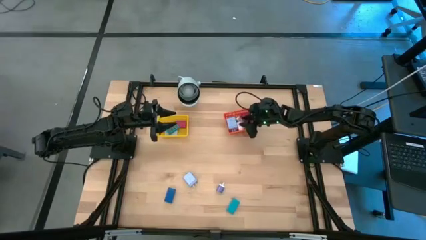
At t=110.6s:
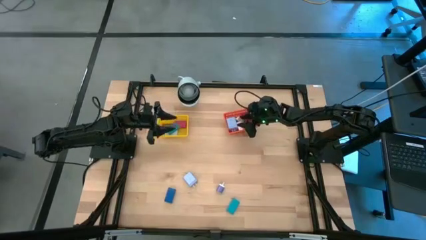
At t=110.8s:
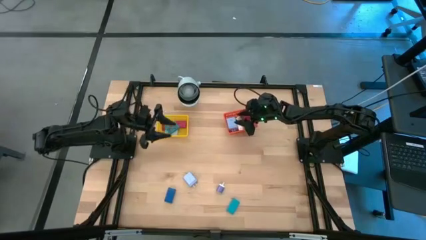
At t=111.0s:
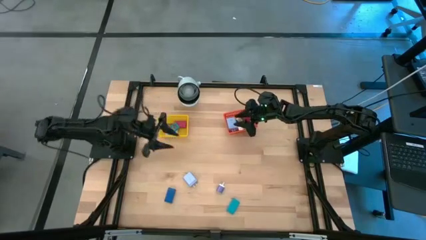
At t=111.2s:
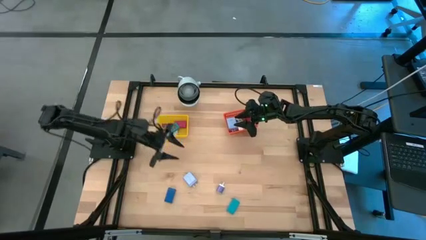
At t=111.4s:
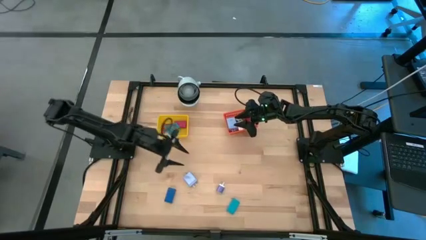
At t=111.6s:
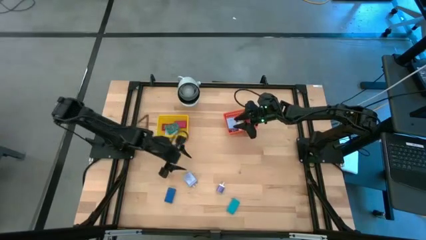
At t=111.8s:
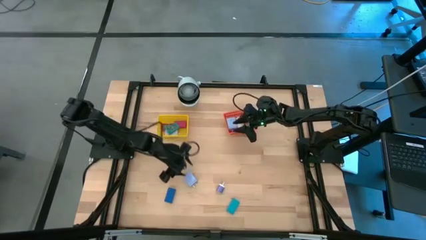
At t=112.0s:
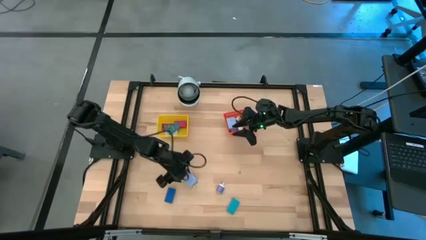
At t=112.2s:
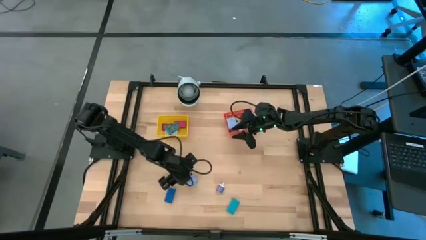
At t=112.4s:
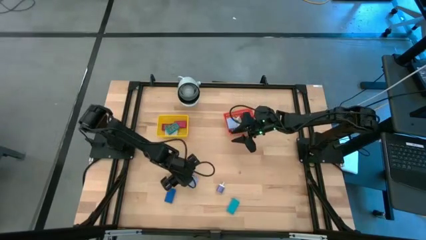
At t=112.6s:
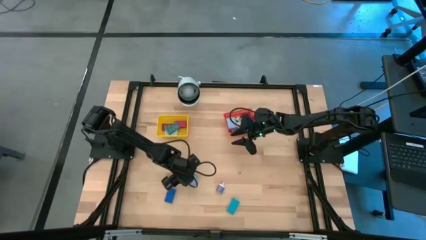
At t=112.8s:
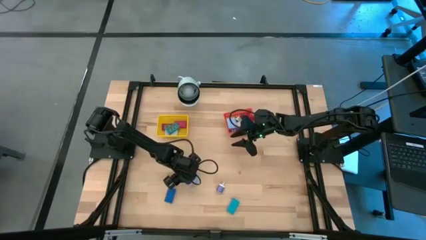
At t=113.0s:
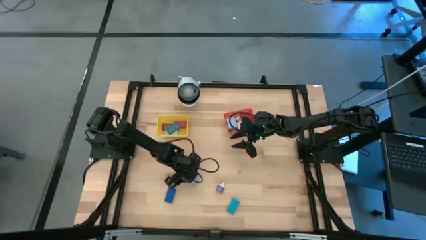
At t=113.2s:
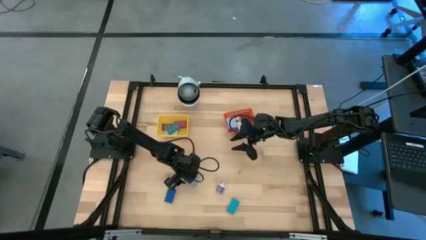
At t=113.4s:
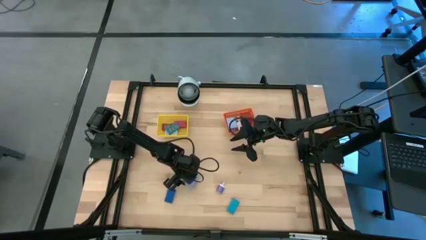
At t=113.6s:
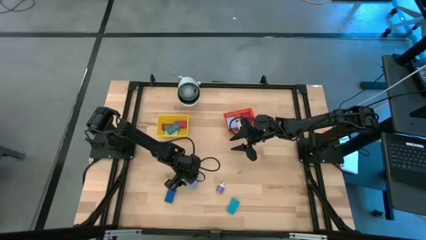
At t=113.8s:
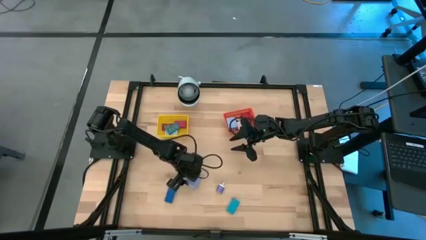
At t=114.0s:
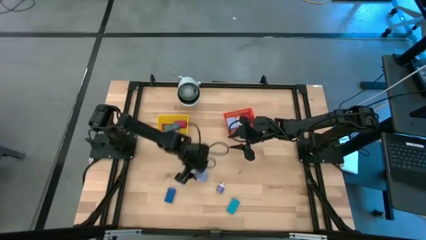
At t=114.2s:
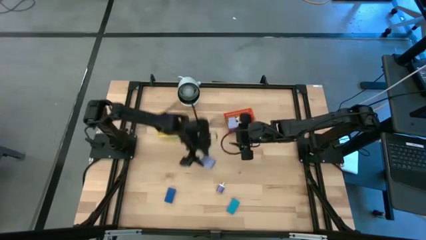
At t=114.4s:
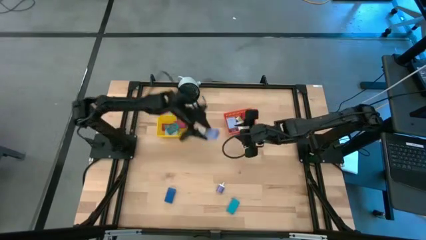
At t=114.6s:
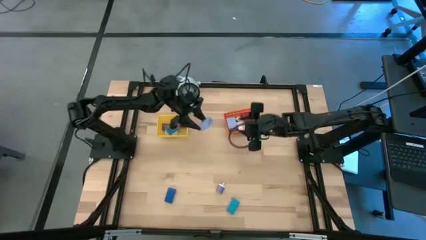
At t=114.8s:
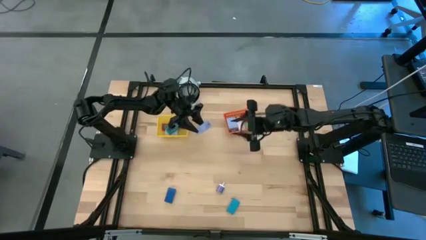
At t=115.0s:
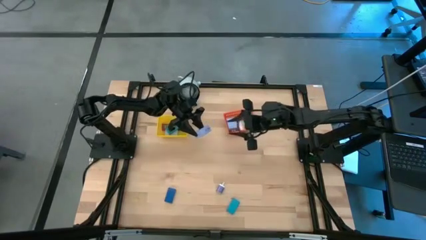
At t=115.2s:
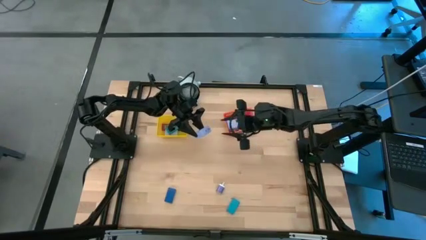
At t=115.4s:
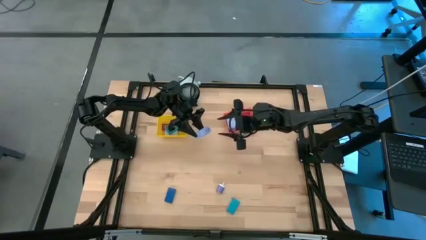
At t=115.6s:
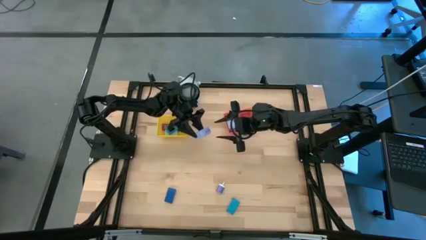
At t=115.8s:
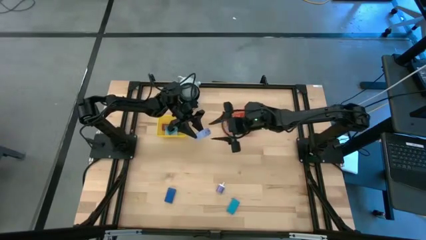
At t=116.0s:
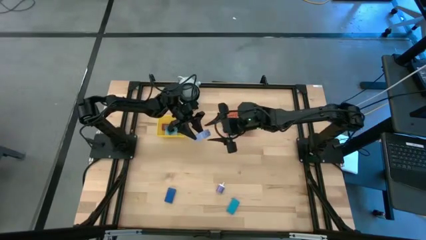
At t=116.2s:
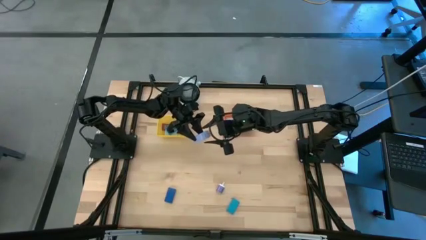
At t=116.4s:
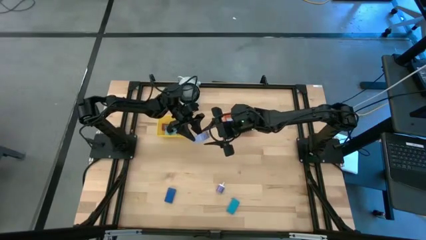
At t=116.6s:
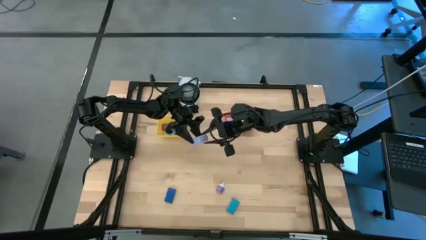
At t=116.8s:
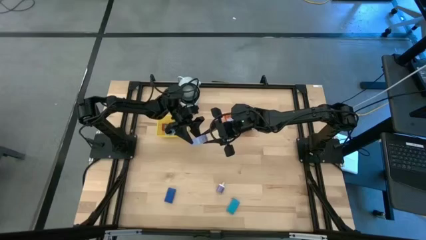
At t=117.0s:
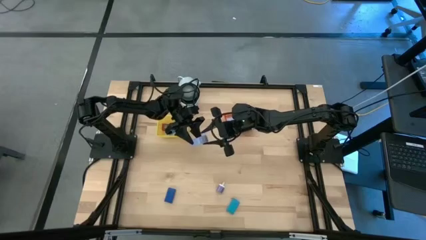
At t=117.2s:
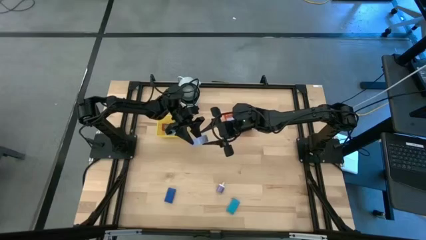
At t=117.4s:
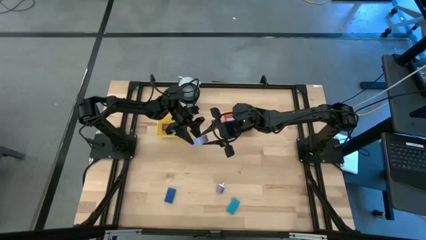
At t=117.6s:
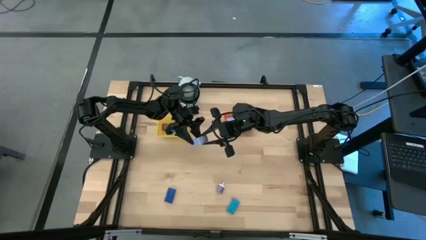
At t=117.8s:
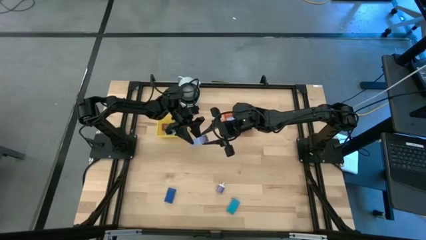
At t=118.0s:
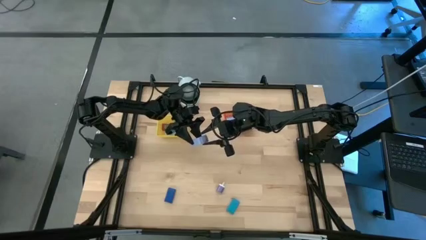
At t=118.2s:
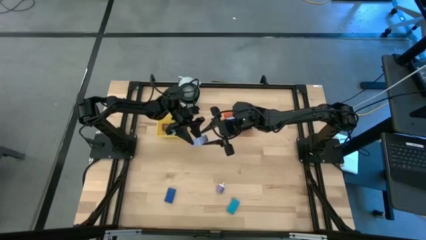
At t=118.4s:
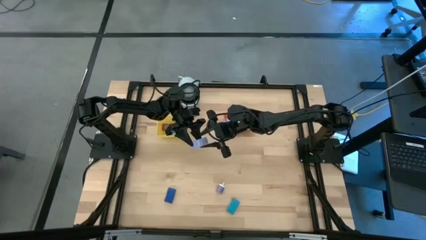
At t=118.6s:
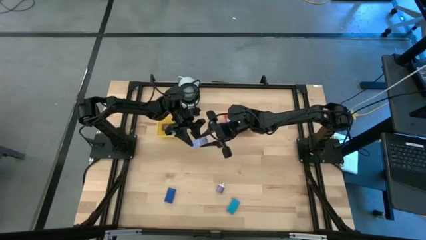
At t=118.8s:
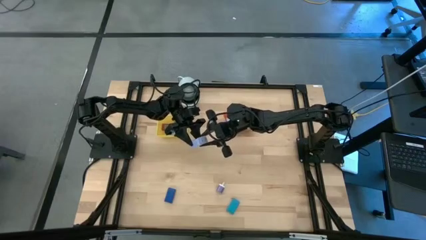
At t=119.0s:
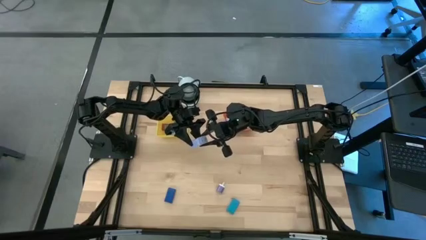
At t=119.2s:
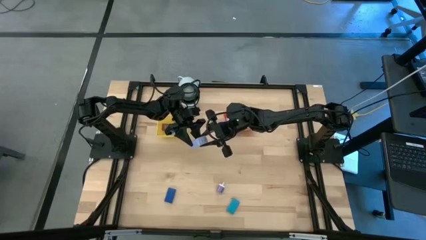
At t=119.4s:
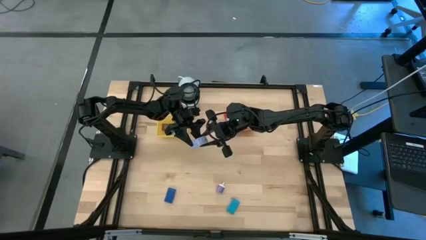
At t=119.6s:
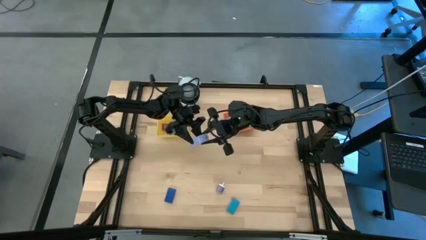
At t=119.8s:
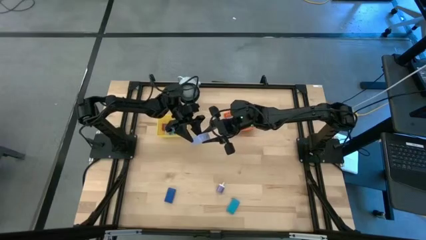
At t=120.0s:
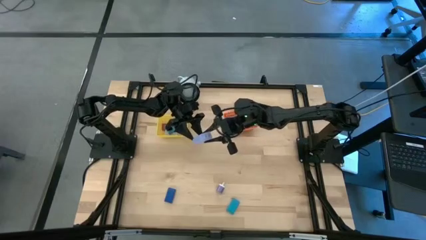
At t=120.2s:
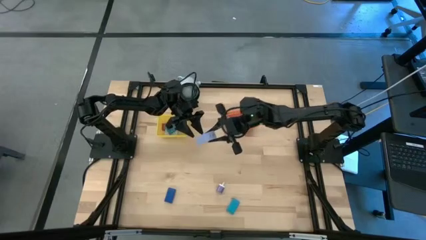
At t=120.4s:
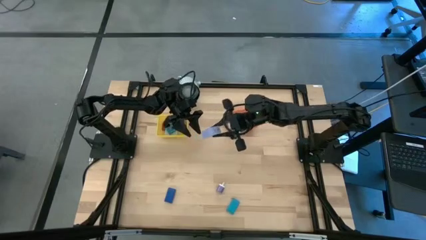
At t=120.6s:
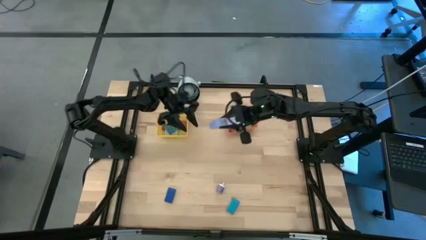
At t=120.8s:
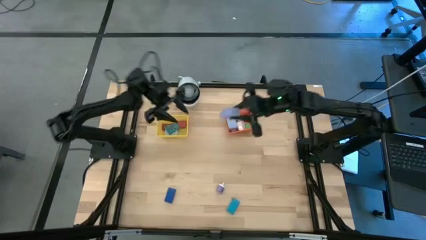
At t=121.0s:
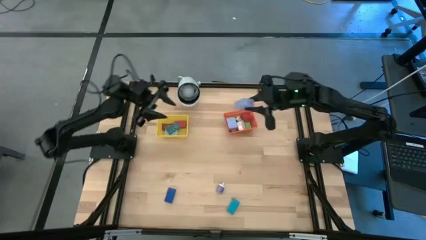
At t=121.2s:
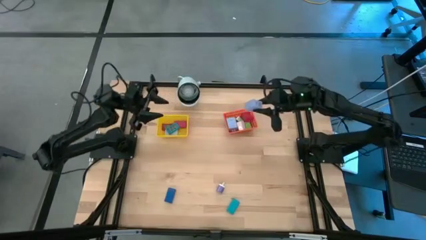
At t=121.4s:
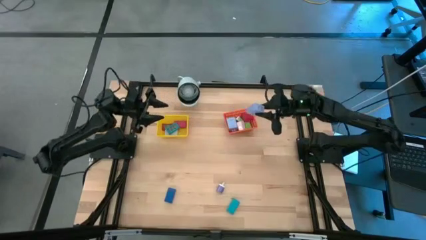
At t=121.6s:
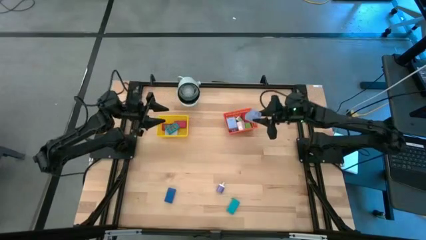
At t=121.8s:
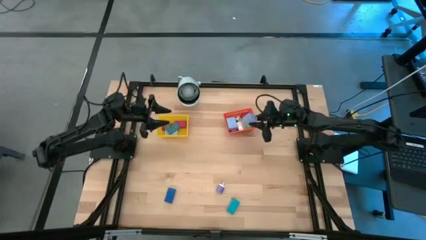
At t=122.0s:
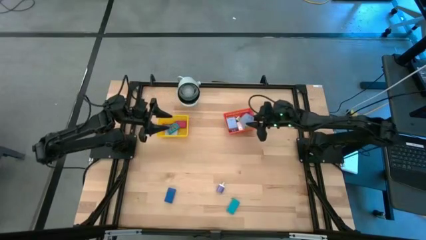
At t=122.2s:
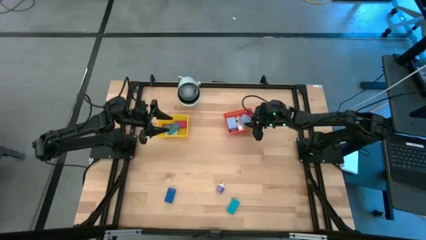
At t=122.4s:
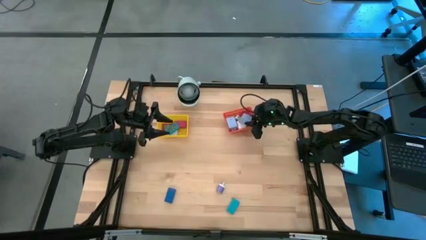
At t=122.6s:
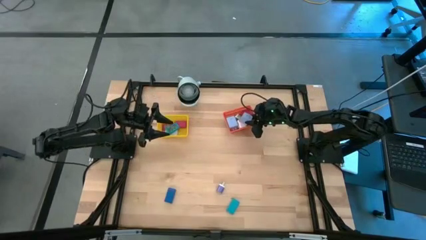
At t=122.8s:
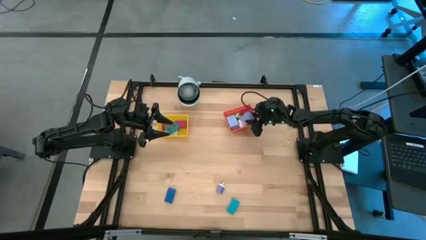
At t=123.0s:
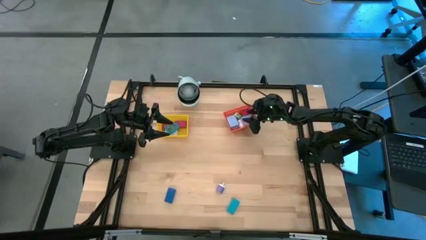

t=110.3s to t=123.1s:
Task: Pick & Place Office items
Put the light blue charger adapter into the orange bin

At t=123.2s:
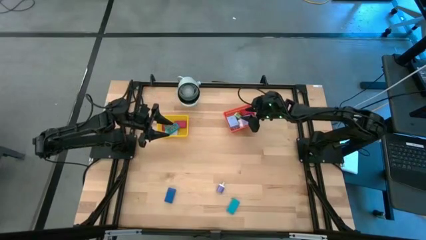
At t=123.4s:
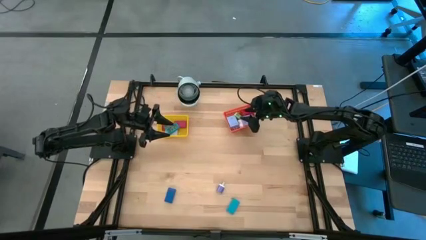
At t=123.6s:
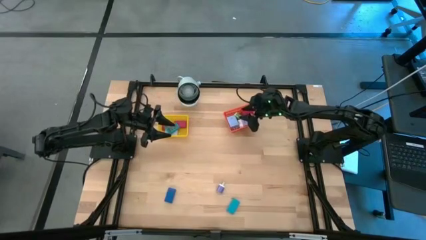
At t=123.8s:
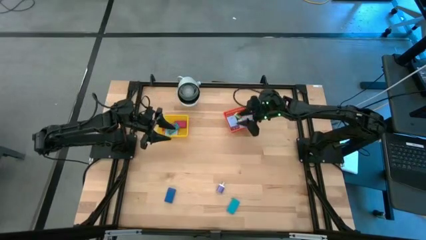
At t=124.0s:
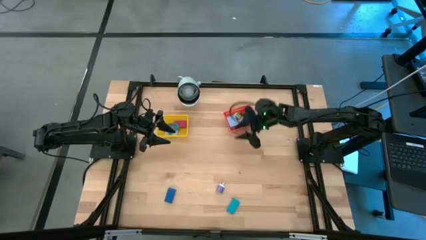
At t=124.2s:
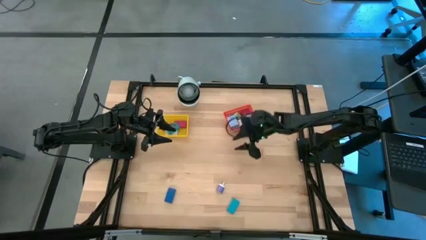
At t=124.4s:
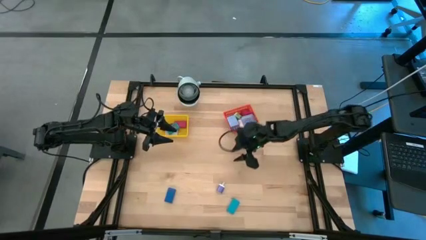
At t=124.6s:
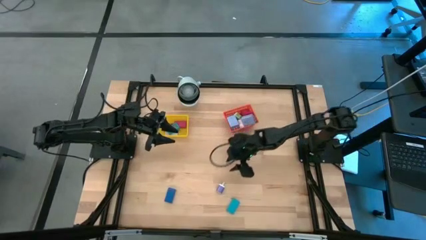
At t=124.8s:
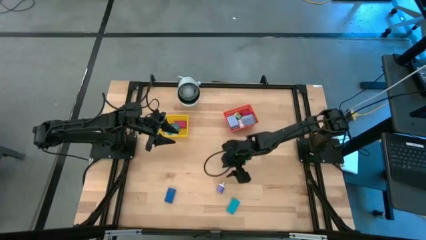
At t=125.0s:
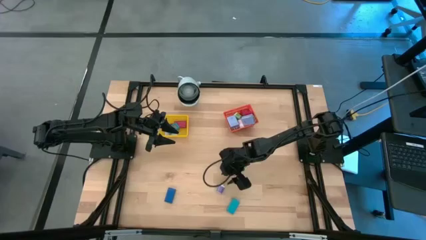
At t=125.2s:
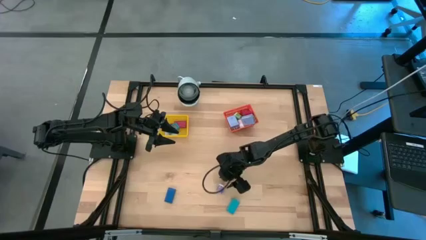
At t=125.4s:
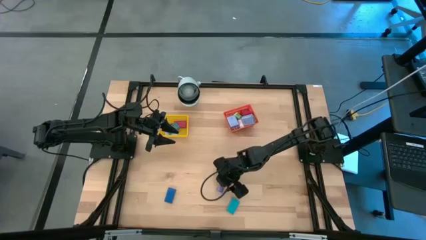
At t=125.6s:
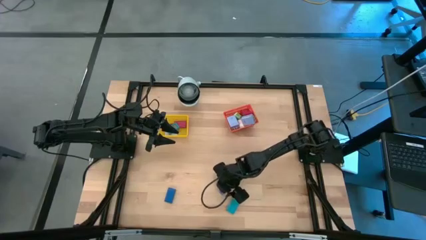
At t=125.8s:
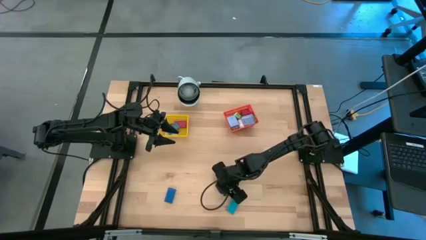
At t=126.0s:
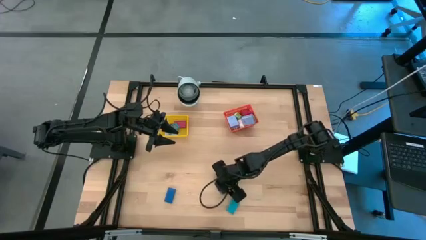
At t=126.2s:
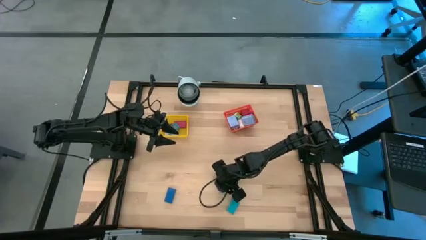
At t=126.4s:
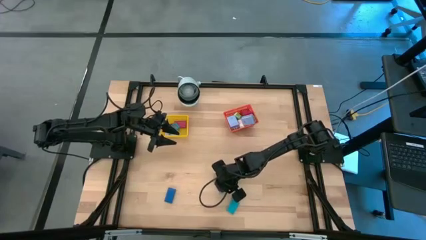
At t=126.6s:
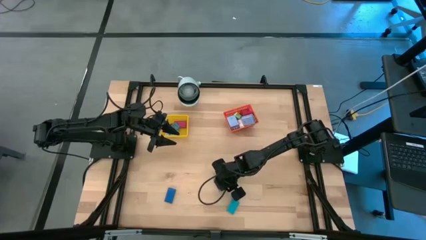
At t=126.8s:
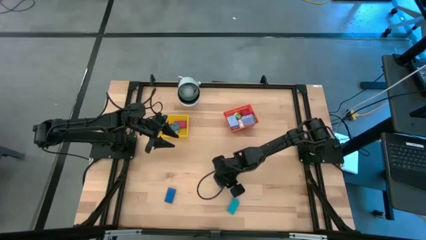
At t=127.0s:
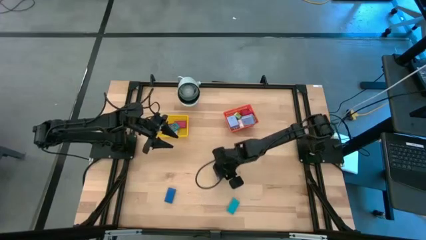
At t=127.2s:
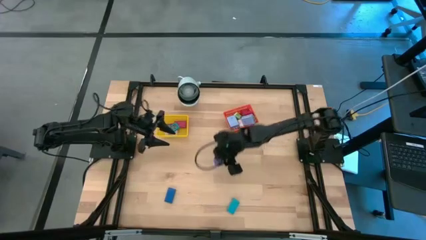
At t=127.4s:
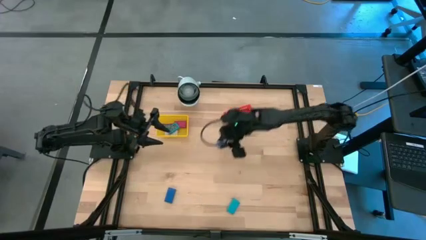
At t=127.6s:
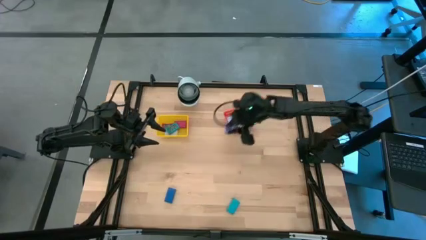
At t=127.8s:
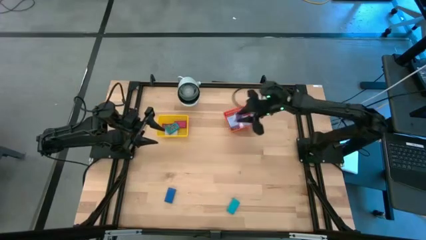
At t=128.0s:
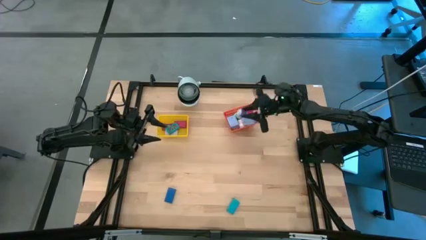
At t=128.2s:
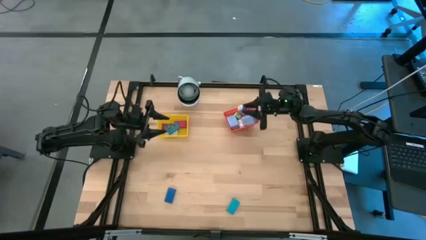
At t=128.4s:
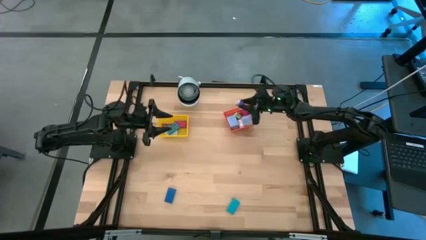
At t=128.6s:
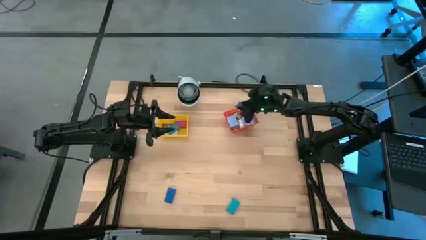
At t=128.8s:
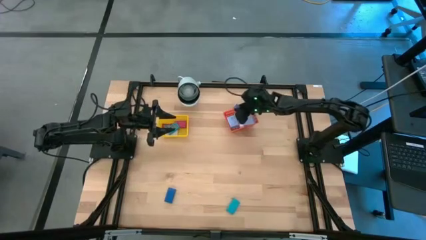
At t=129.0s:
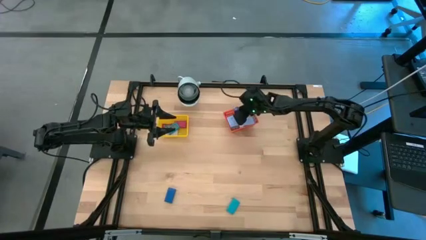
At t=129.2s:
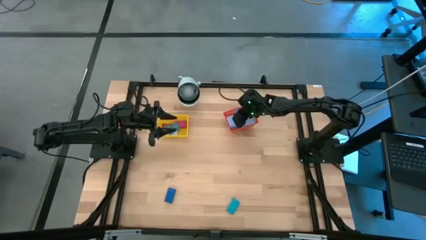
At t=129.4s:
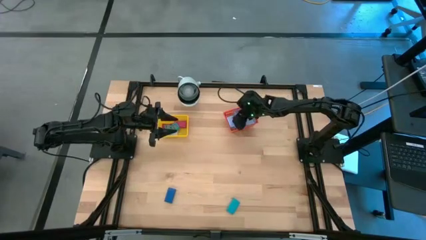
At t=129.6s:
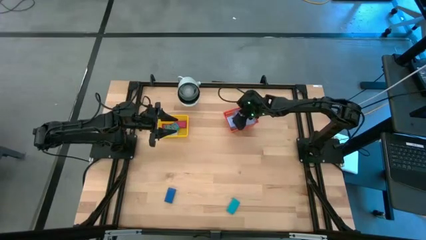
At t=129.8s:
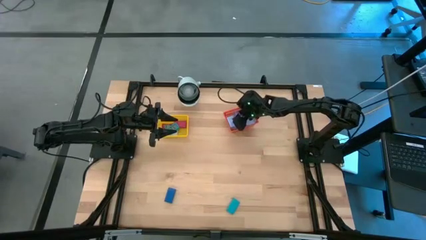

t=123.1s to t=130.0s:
Put the purple charger adapter into the orange bin
